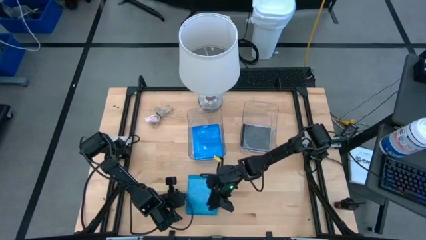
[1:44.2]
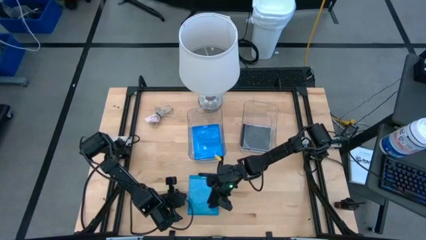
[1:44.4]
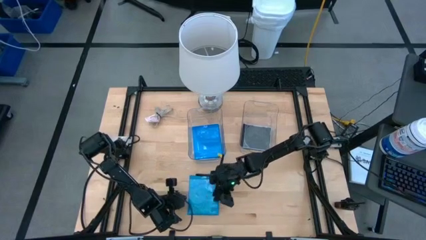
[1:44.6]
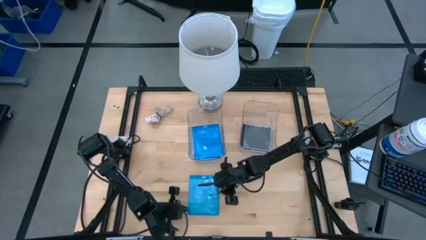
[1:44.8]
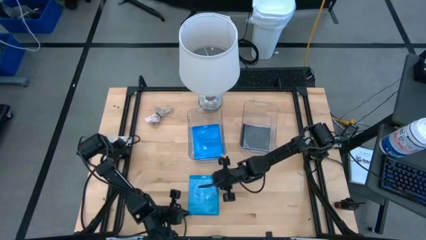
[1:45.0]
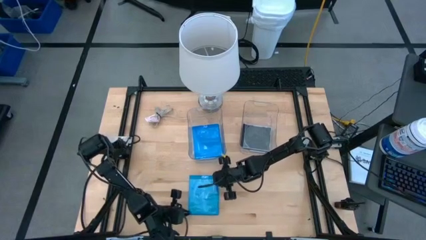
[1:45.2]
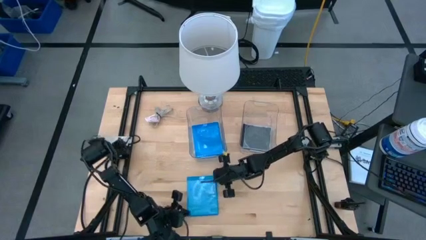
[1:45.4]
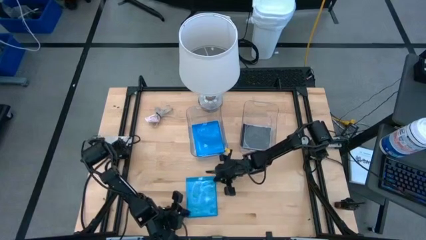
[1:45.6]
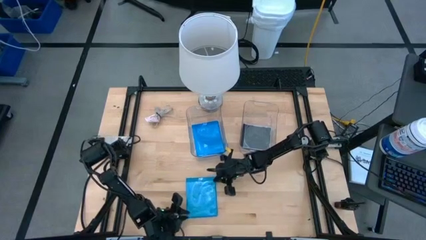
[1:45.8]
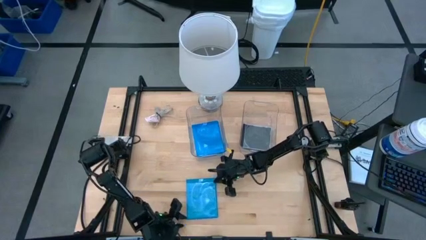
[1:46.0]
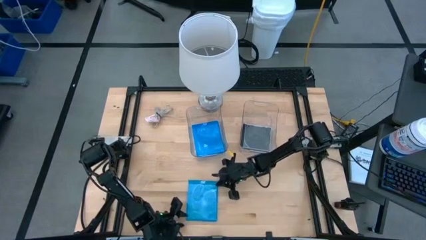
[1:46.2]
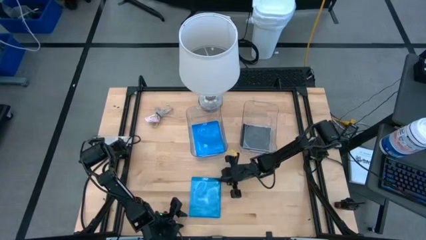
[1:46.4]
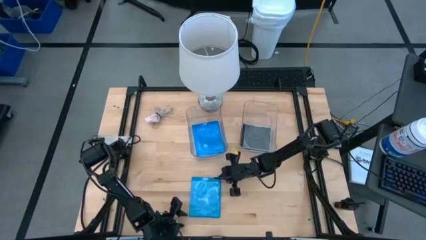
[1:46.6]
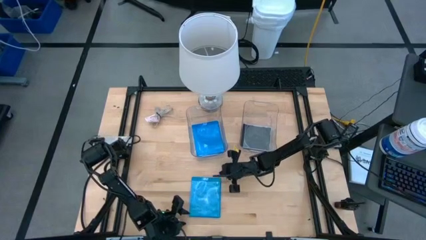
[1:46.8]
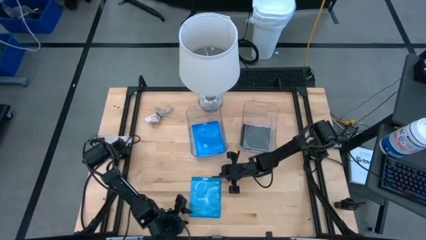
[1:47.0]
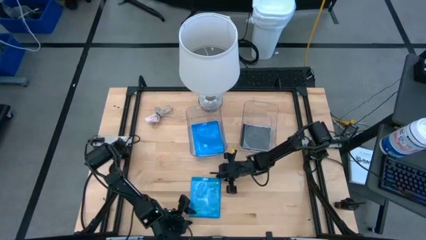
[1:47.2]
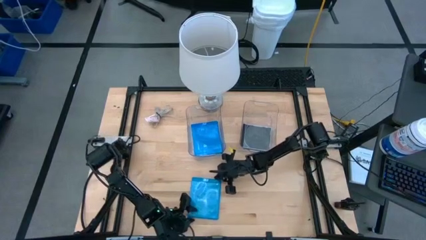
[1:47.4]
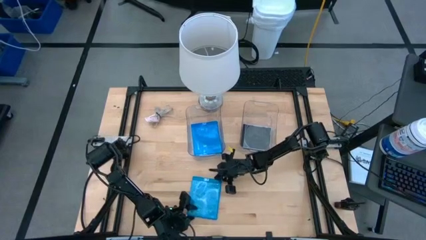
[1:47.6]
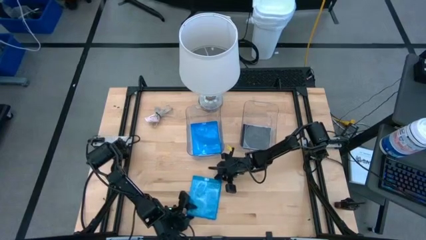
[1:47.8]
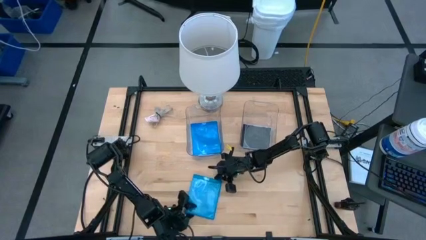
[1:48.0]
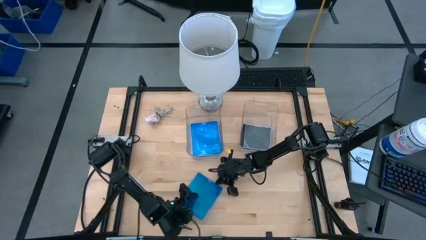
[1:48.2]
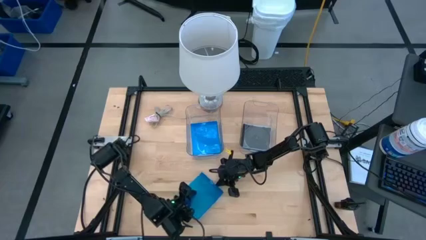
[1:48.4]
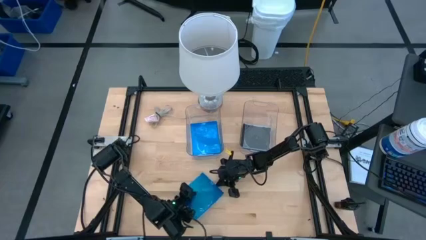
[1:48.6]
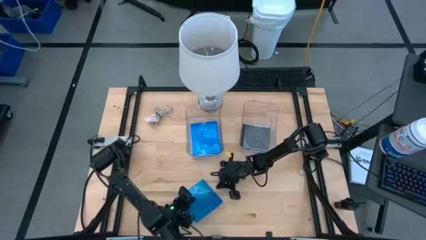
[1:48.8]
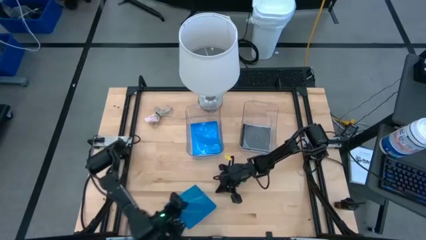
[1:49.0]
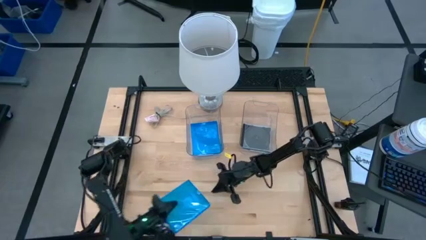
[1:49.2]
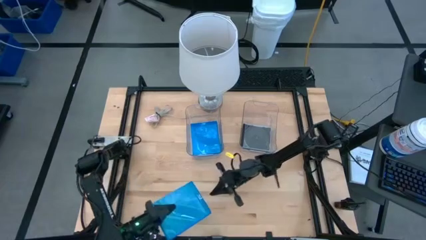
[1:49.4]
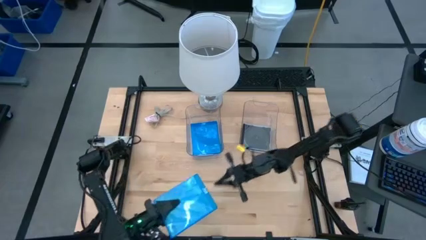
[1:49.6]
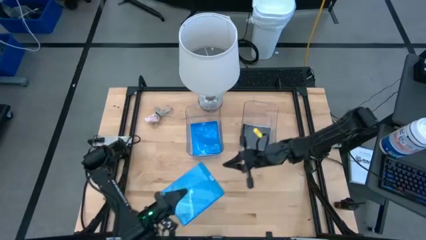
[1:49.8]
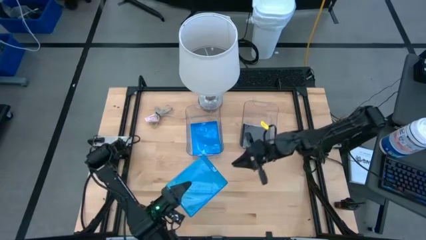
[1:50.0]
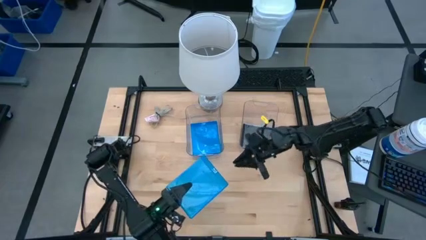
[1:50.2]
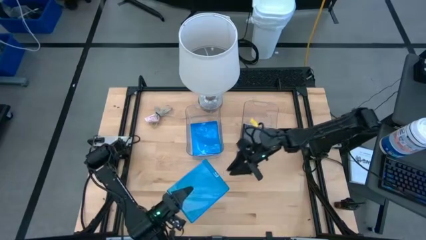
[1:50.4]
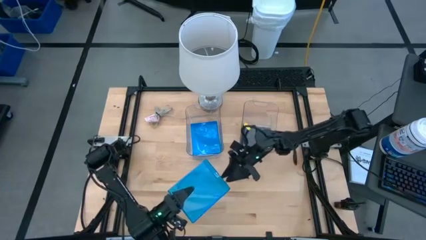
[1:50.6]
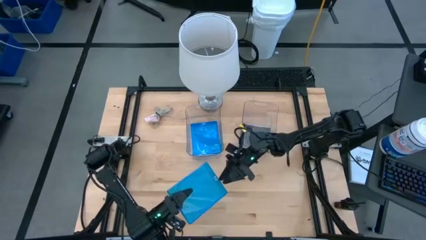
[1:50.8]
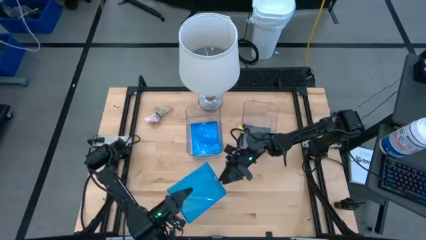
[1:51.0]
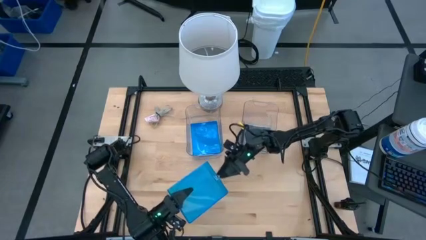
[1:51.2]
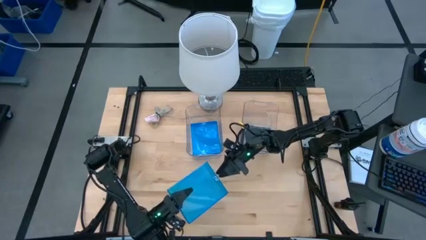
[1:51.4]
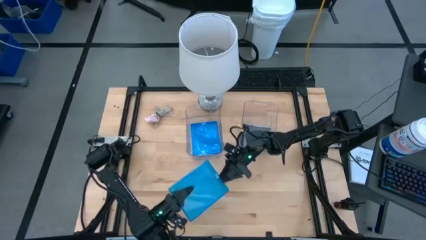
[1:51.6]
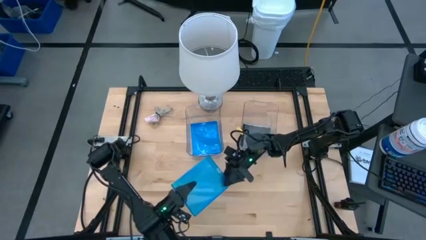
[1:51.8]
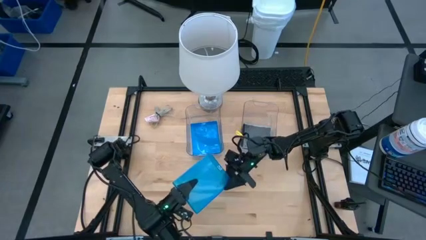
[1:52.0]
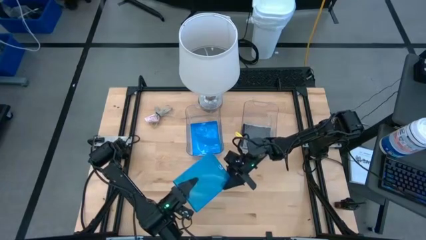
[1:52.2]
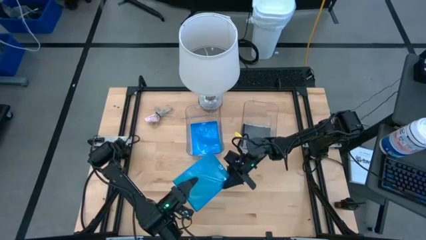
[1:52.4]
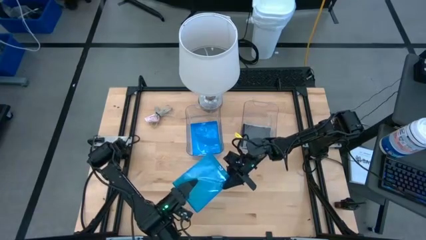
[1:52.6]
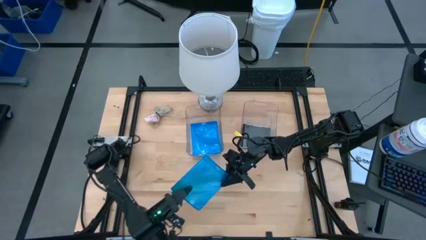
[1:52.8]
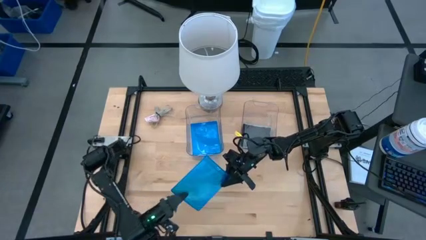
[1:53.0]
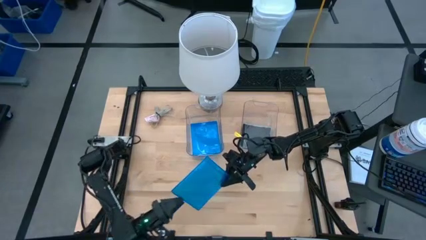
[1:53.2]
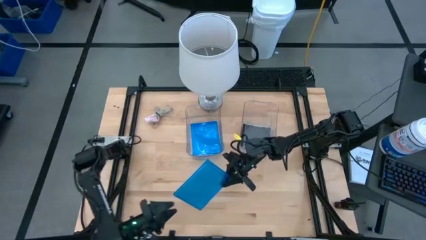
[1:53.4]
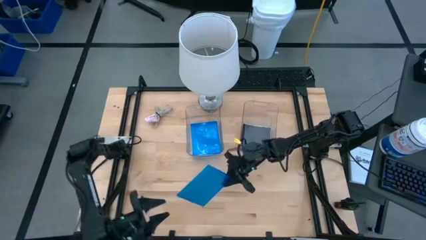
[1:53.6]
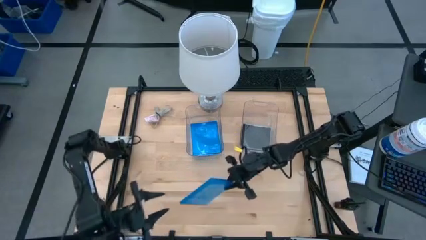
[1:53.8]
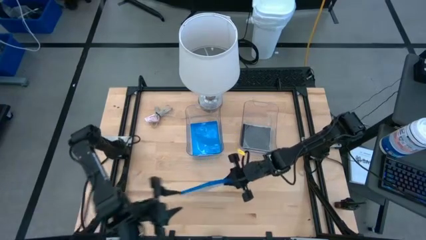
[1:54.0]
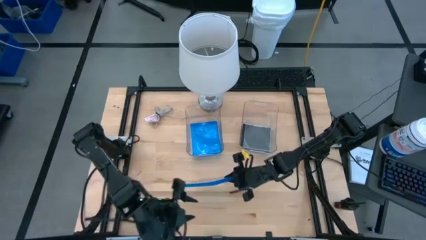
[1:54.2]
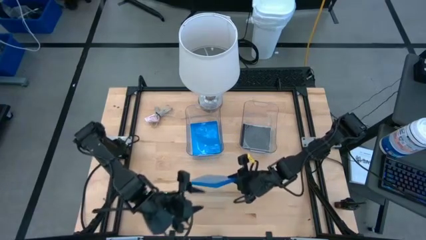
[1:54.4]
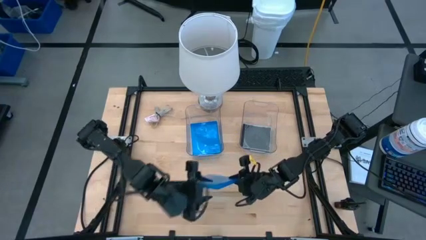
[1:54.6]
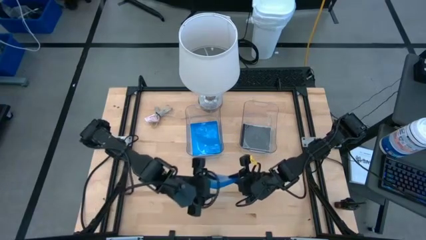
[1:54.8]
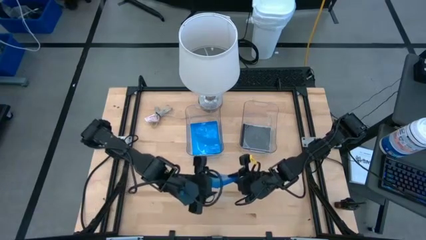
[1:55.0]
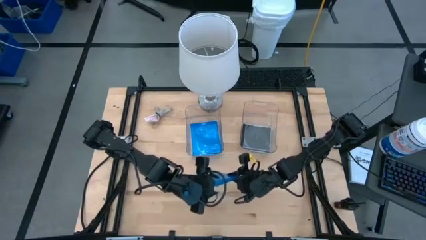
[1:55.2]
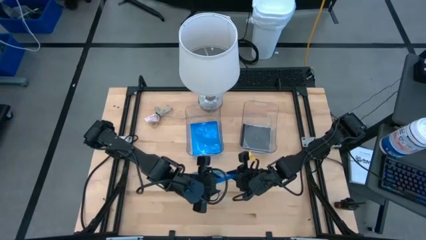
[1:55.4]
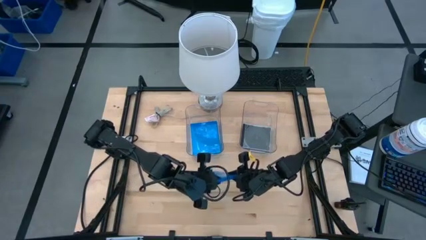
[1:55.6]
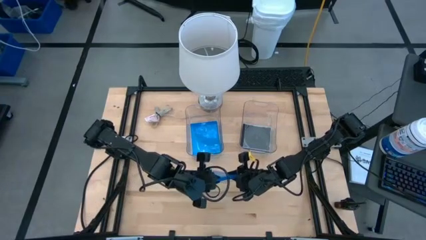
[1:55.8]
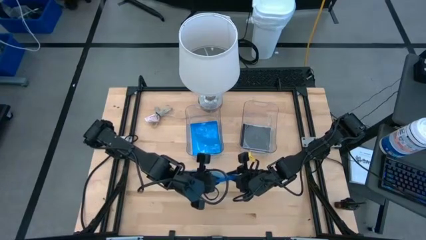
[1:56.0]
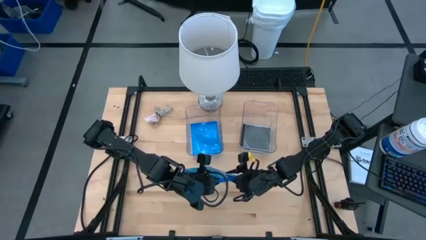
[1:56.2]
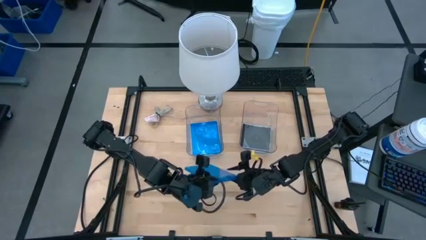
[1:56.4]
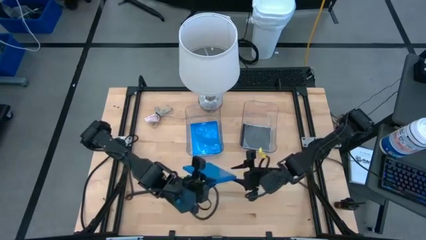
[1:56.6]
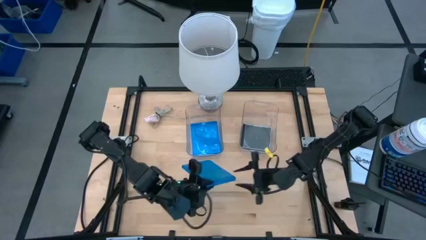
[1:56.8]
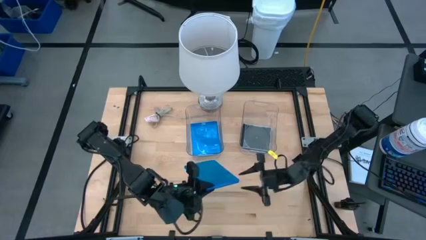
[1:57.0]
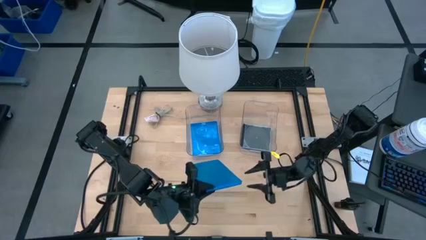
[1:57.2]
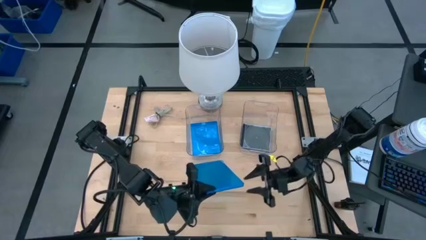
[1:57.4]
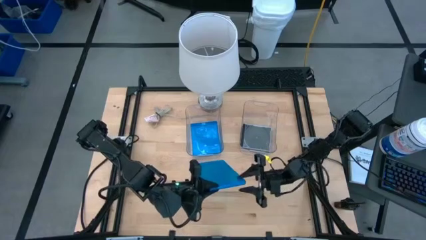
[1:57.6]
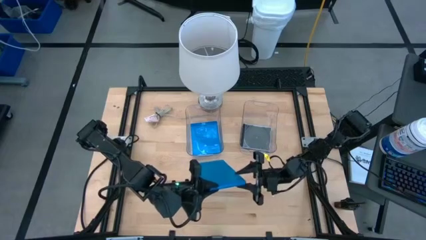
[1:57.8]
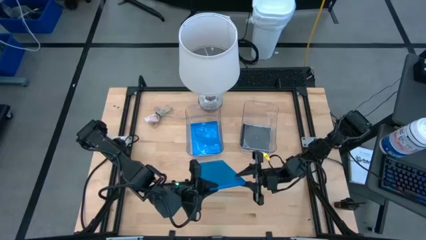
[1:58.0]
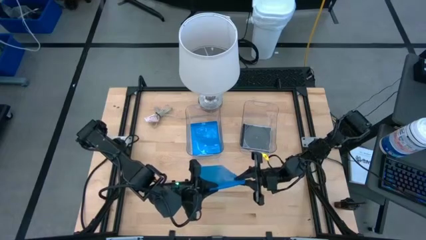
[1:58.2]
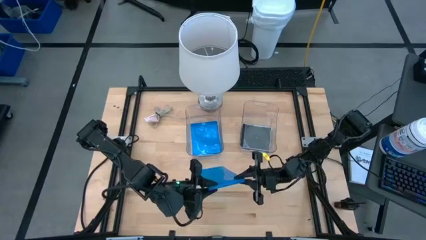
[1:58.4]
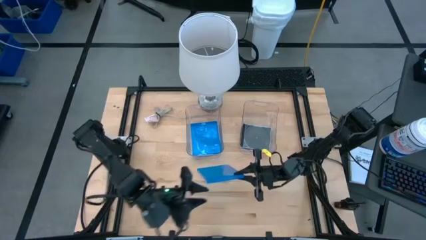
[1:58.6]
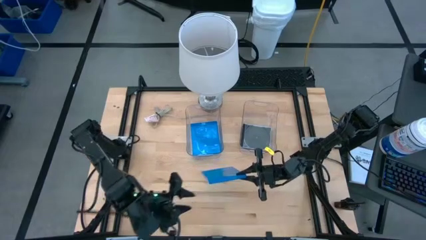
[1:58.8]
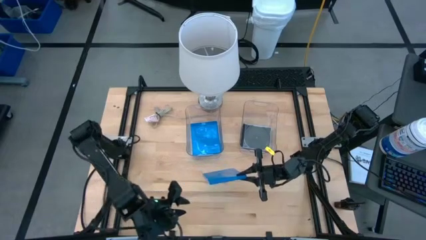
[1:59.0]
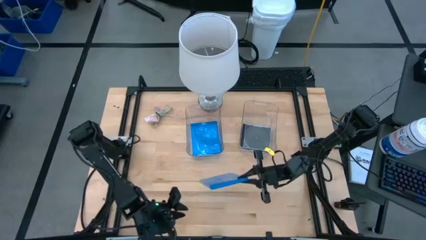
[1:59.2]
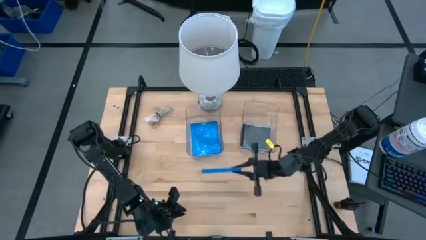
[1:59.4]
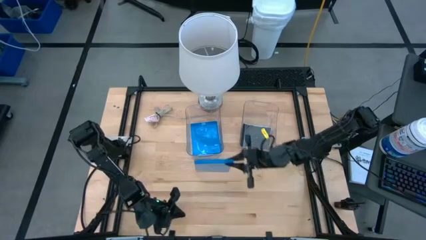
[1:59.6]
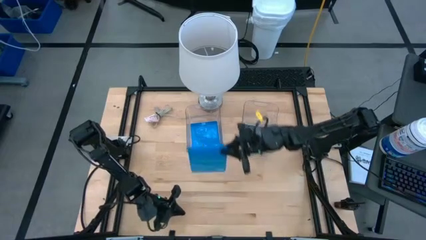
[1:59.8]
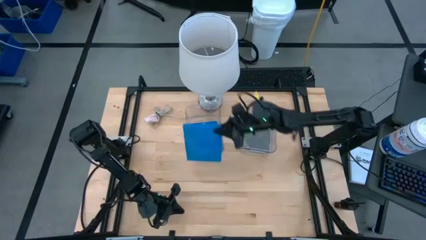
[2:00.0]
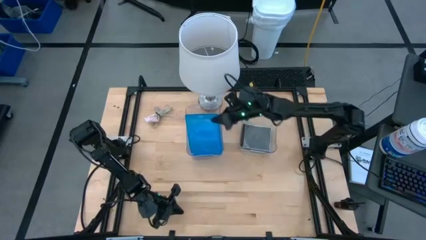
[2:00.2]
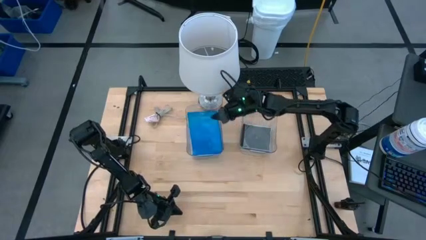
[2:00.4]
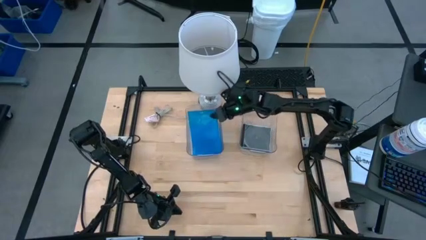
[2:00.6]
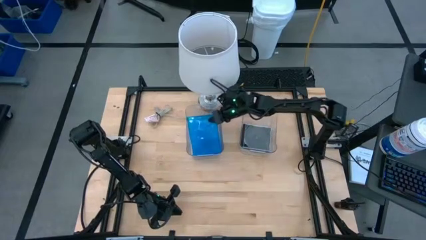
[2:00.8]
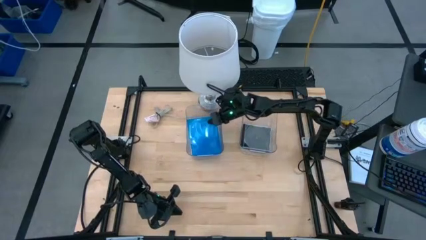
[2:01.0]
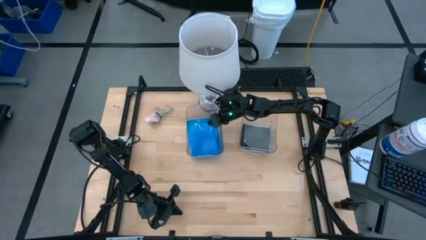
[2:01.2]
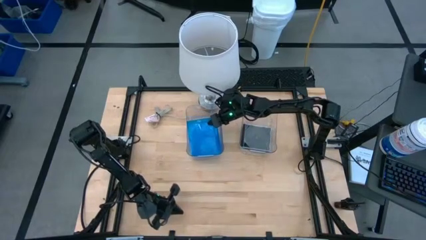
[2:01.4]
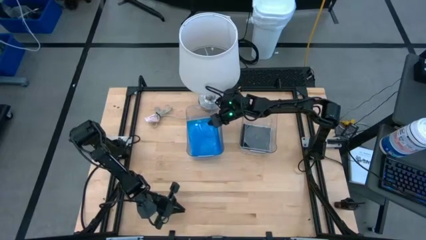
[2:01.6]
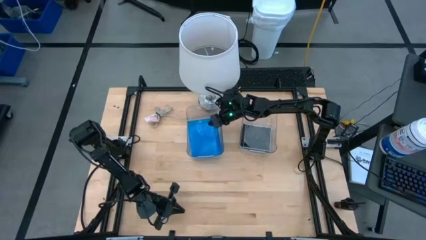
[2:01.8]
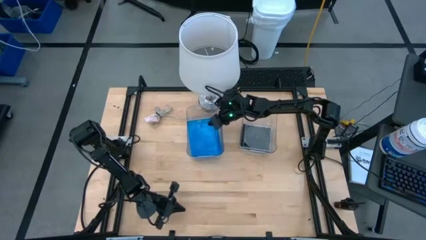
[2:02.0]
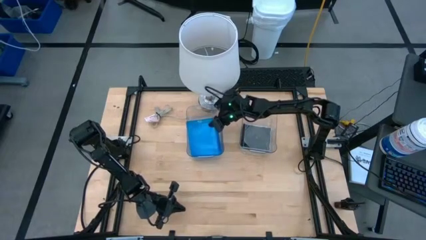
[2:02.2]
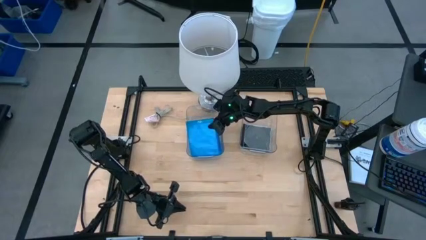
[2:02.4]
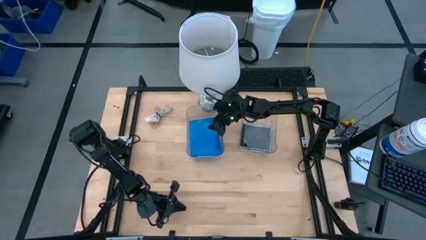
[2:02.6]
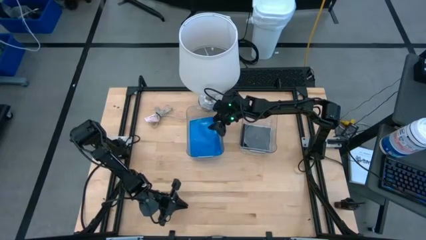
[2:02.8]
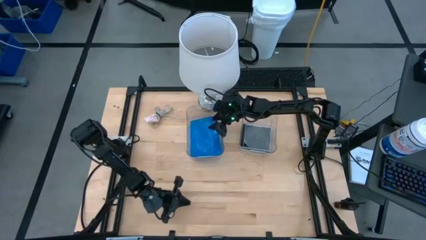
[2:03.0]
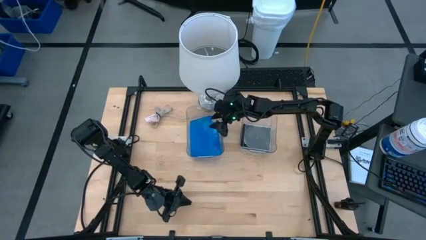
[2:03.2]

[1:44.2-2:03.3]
Task: Pick & place jewel cases by type
Put the blue cd case into the left transparent bin
